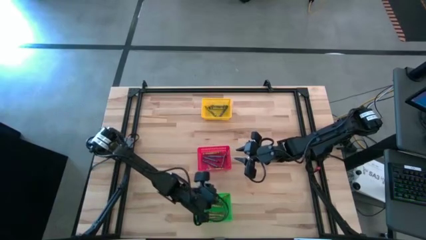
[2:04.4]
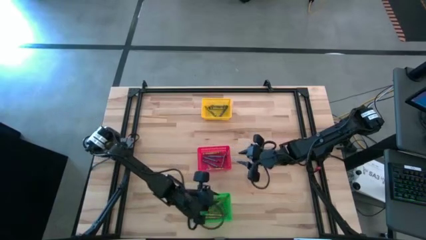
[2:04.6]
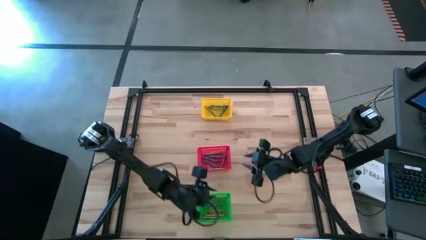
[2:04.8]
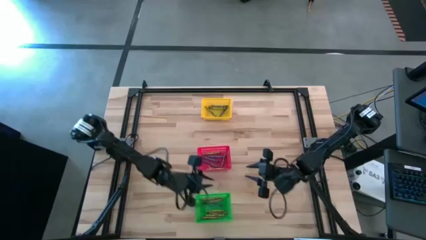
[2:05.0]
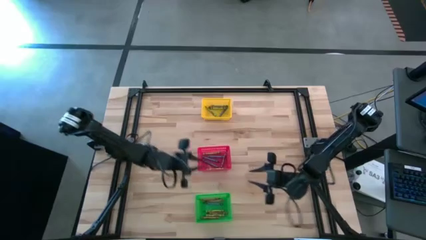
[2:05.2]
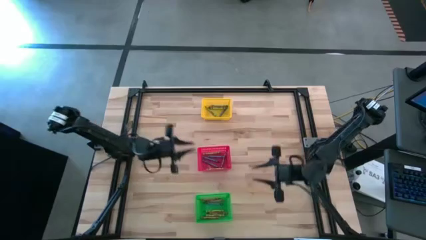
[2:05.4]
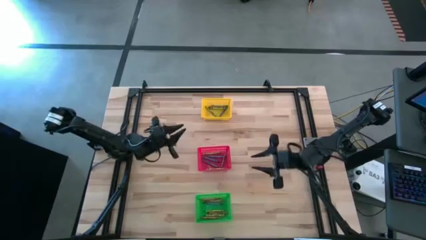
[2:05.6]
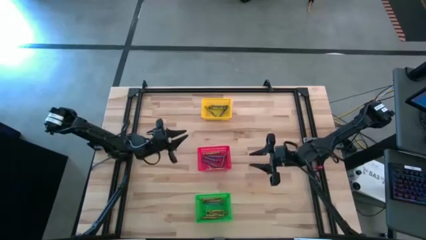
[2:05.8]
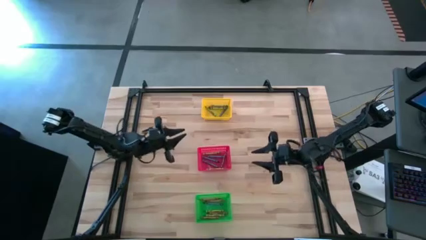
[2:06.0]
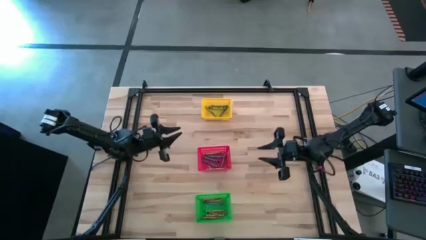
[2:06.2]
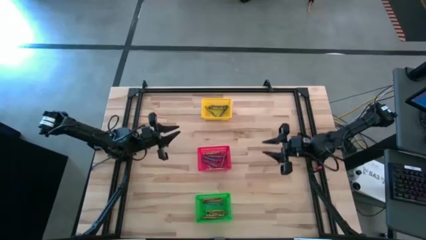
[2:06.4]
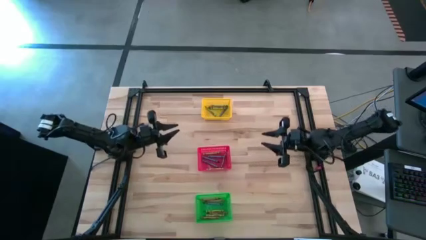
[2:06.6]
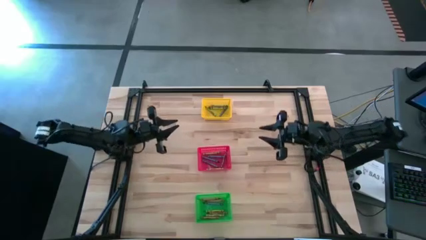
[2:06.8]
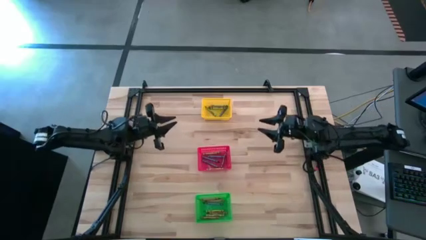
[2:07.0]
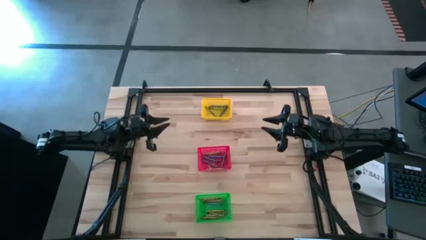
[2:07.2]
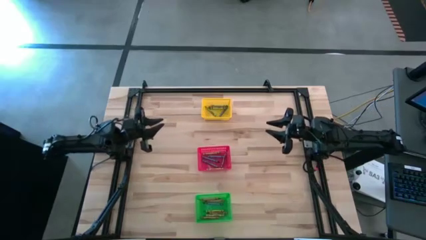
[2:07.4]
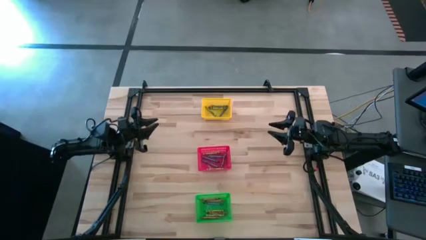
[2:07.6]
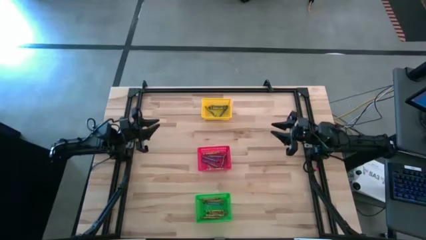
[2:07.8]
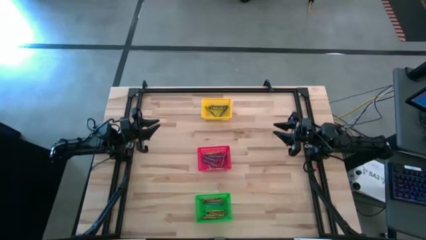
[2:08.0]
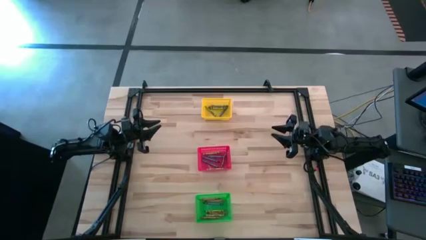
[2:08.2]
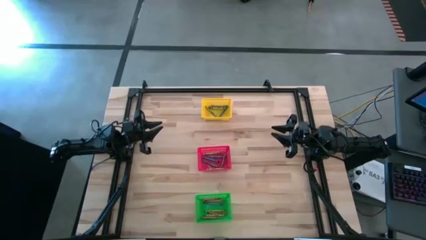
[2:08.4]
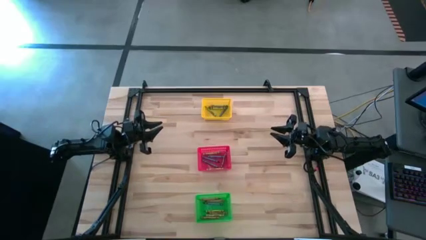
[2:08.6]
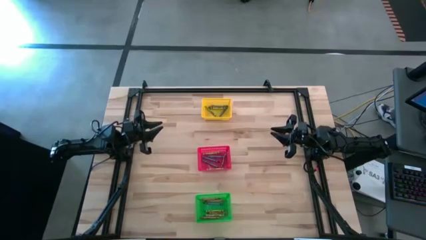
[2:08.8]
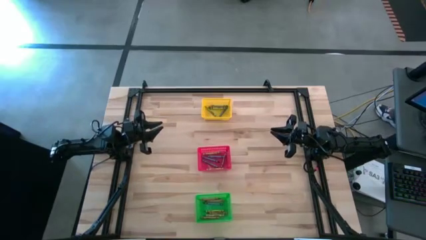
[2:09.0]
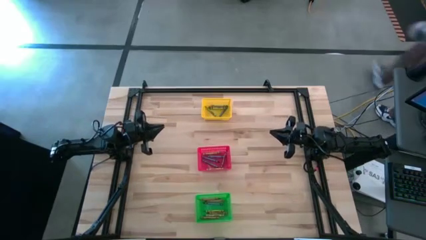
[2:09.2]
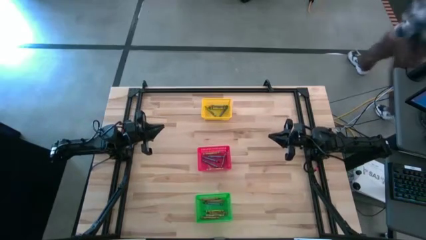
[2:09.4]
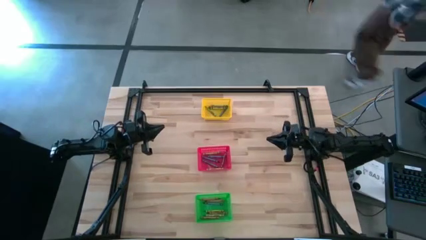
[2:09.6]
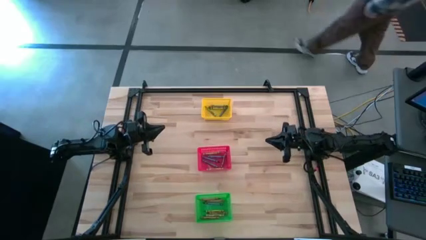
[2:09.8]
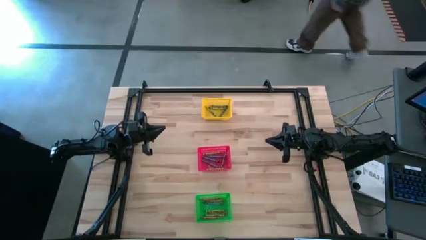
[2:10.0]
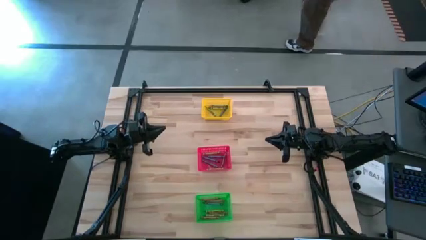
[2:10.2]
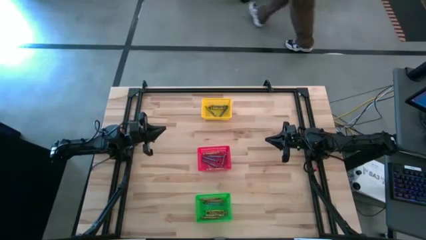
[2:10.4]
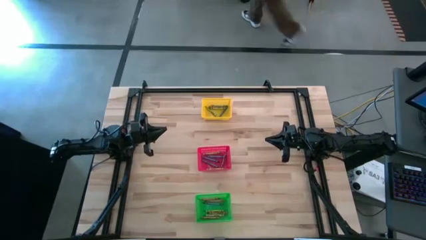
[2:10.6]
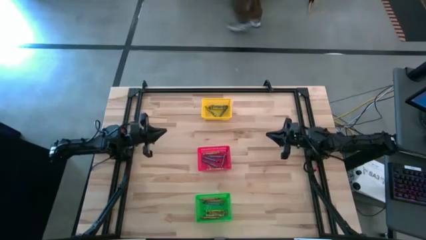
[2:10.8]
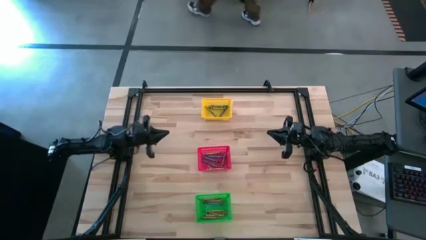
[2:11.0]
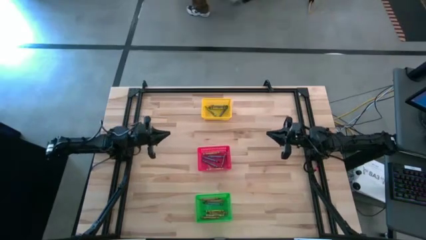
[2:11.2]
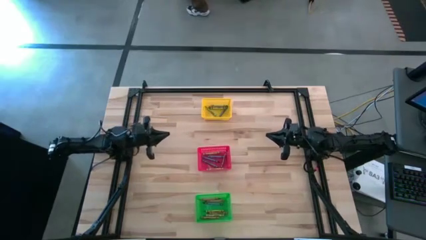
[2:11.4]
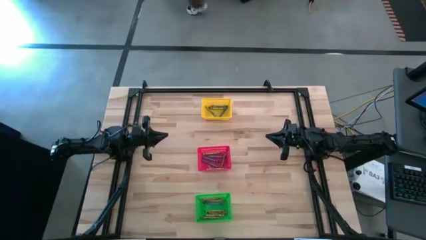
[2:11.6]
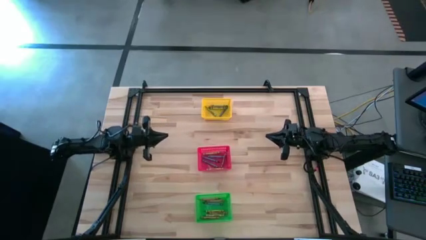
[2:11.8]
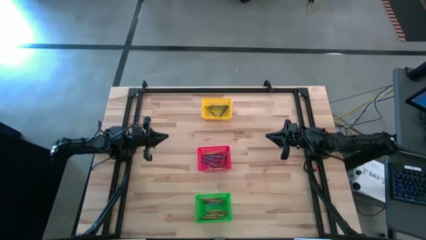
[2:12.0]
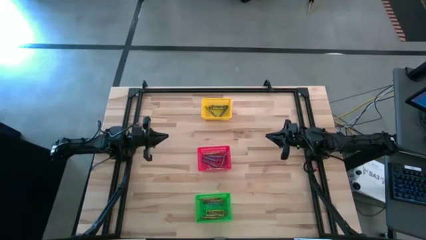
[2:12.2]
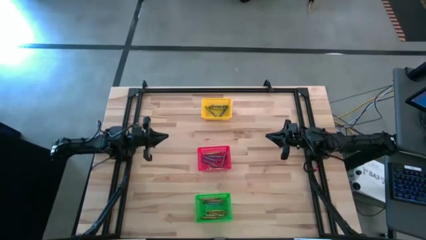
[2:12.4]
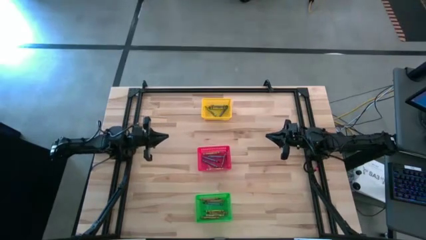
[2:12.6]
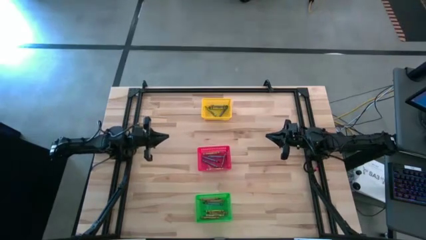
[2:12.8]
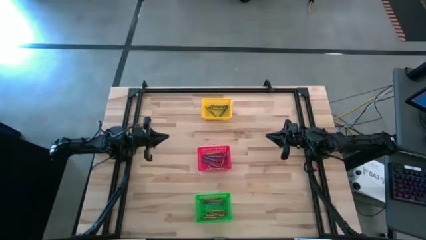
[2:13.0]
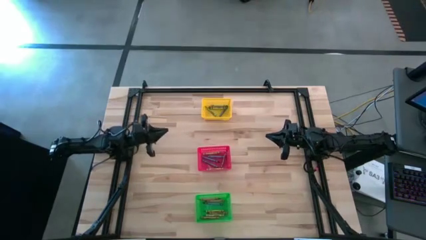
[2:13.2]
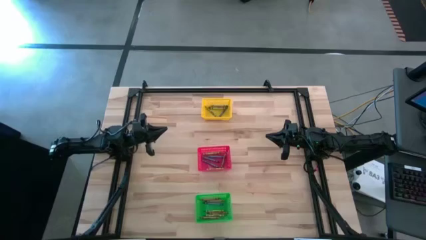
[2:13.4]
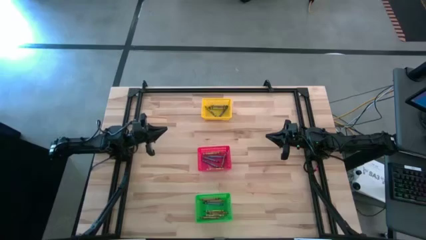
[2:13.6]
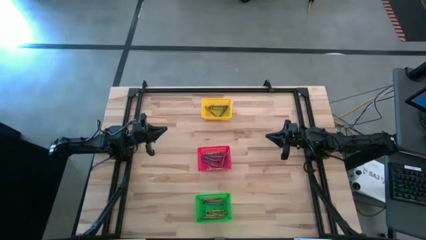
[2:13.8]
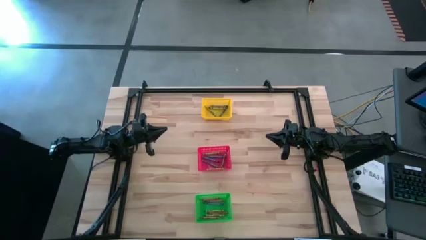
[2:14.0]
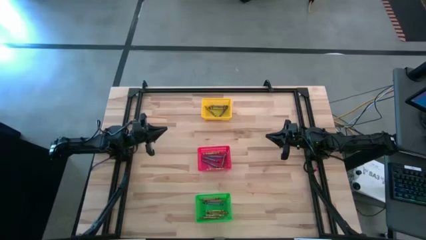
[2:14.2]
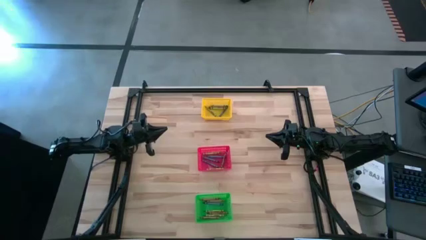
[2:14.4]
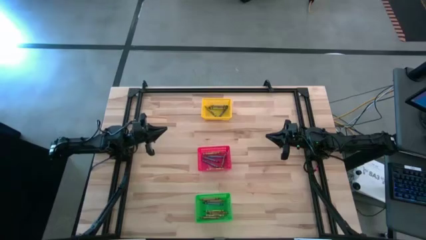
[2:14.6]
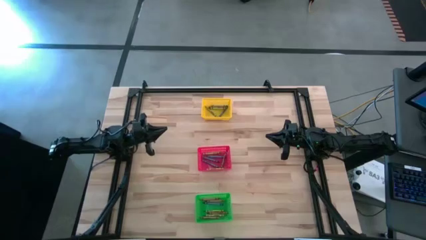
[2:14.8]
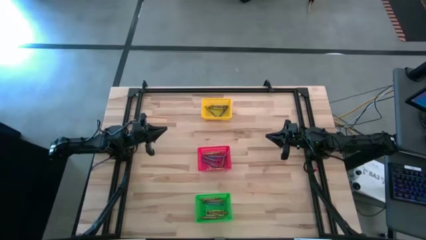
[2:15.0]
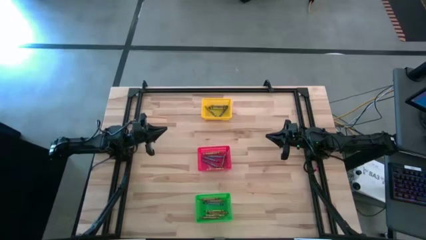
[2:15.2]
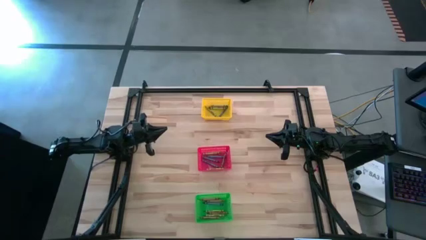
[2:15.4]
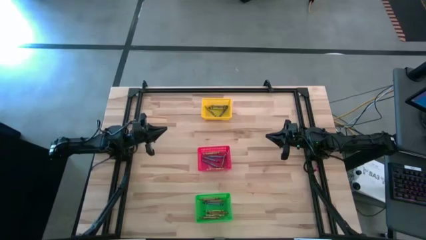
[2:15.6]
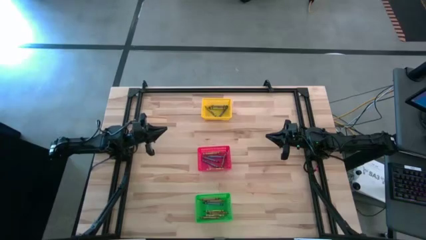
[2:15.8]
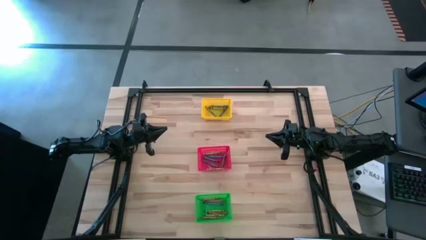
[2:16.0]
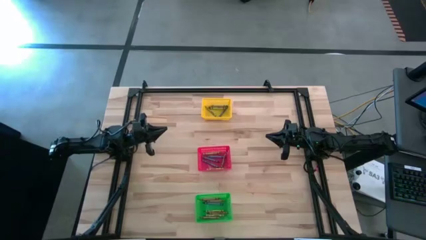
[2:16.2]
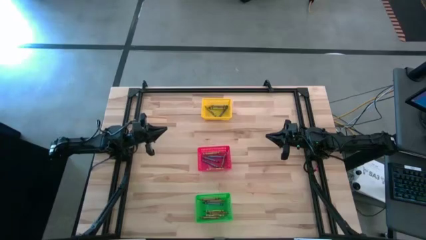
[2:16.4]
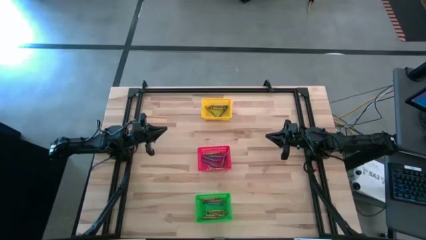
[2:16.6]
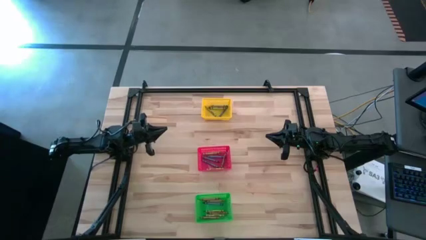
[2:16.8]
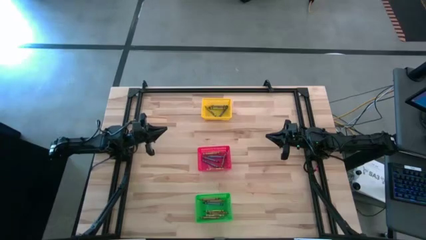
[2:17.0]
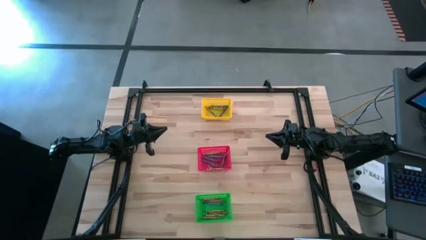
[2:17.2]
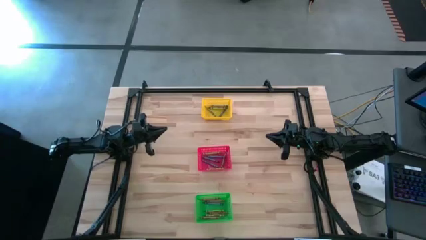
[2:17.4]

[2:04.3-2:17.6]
Task: Sort crayons
Return to Home Position
